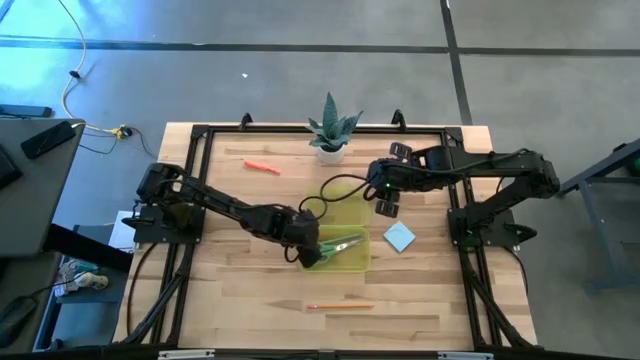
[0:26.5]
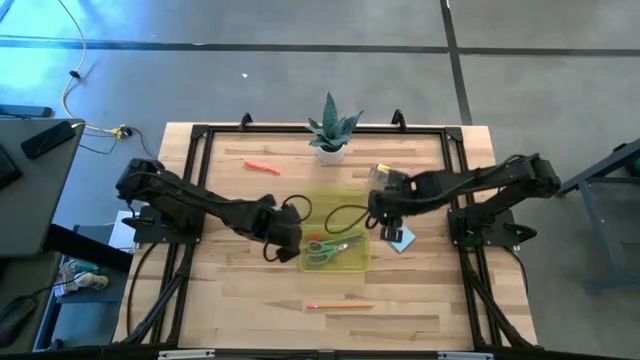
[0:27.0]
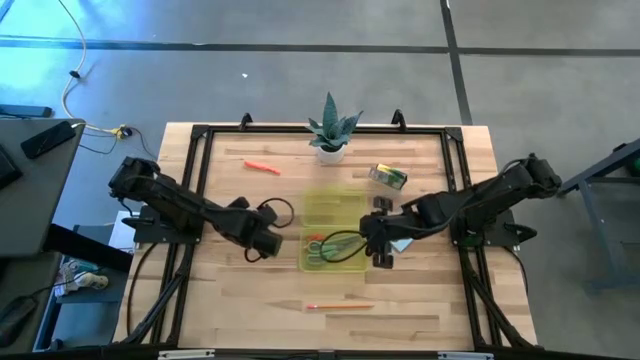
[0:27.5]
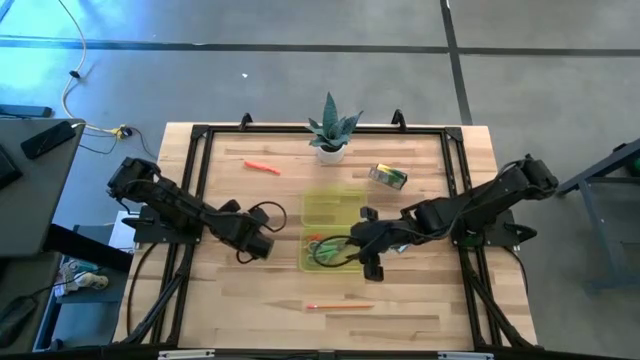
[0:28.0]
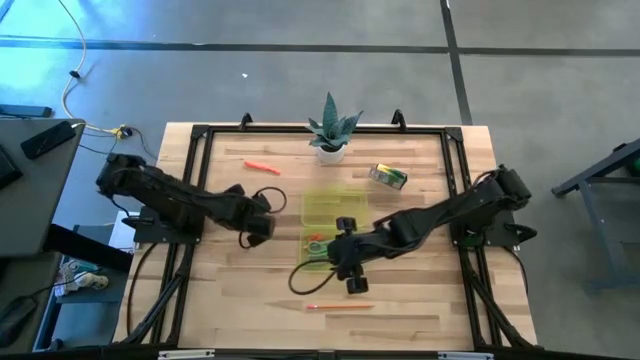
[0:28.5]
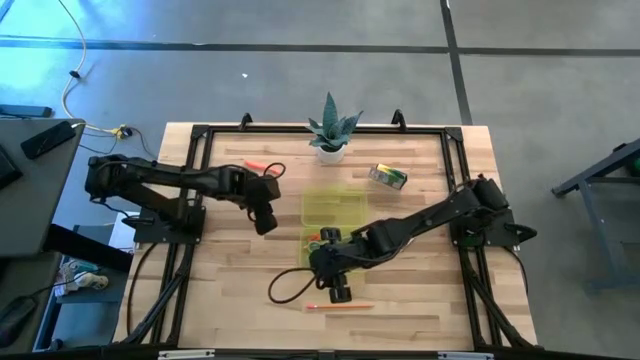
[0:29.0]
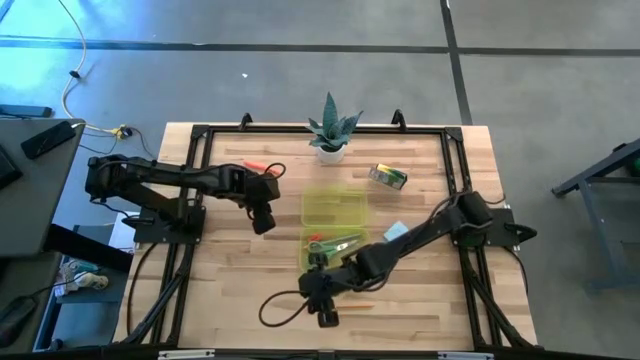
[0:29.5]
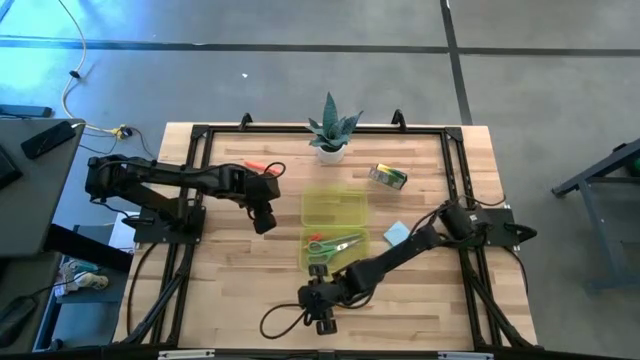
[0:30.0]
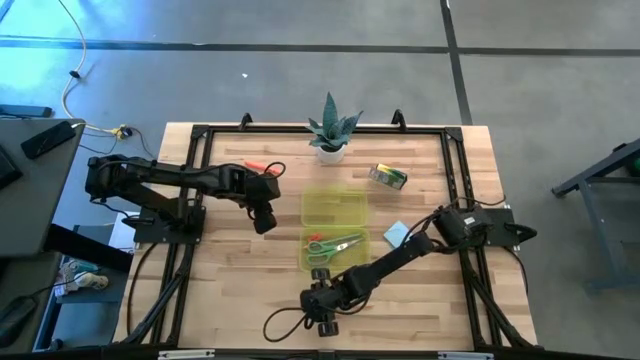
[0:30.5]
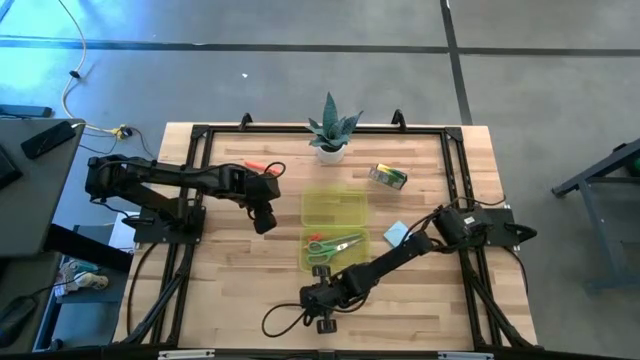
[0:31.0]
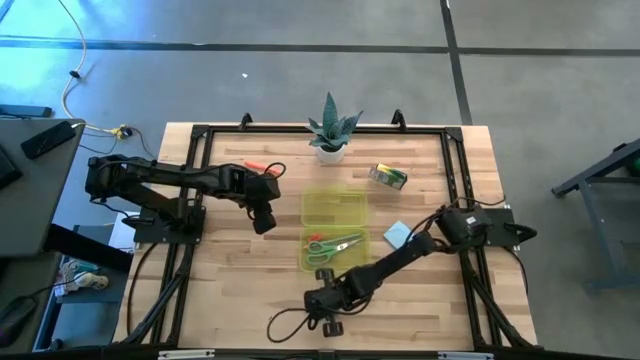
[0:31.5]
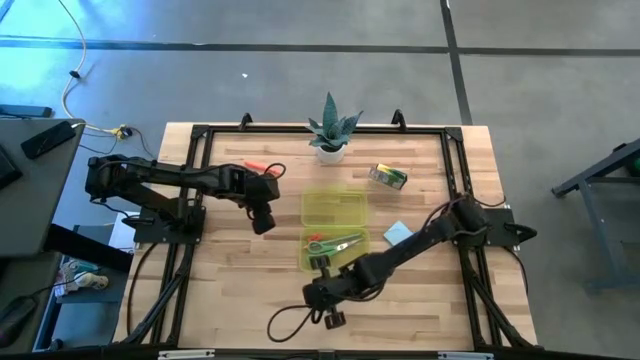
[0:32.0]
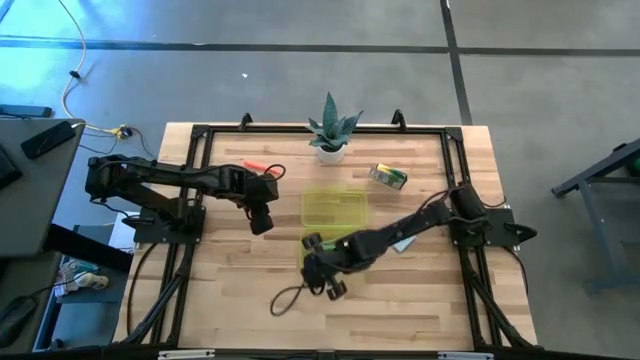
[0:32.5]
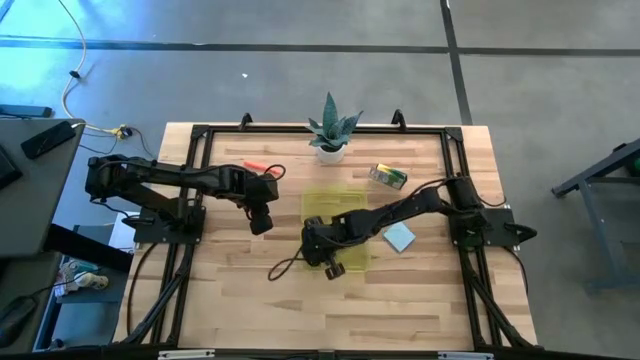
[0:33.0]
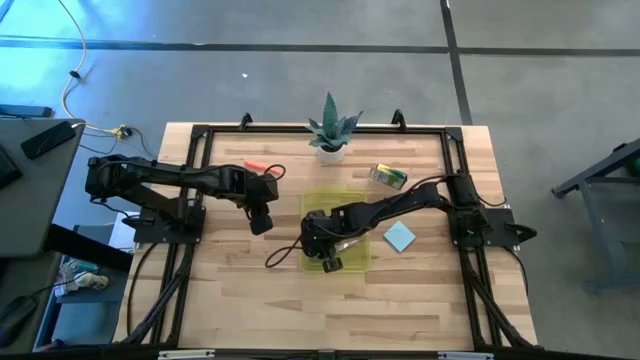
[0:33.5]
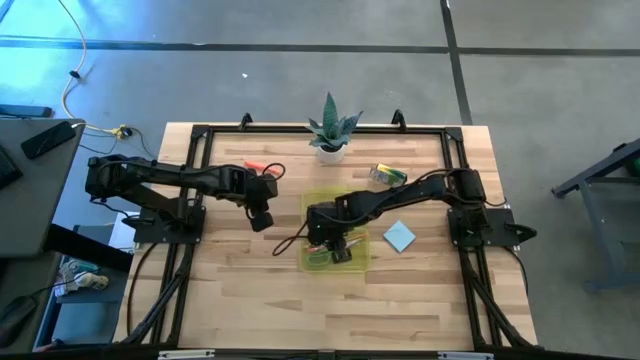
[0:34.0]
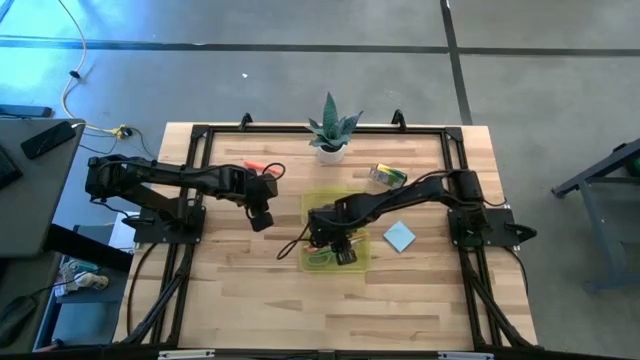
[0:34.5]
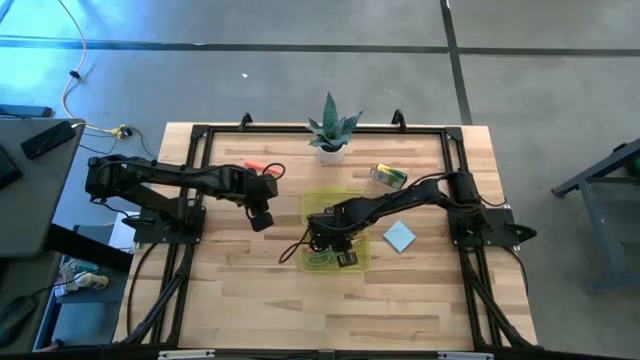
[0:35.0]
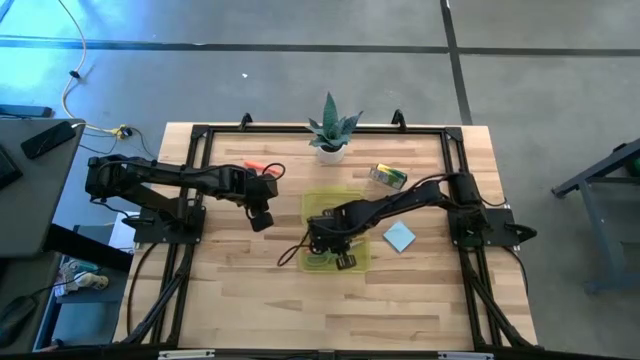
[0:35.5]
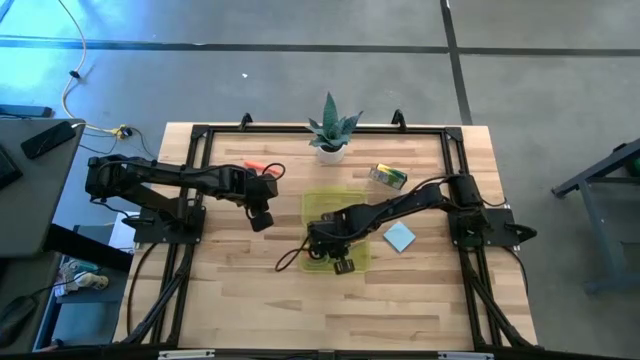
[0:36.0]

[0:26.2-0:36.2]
Task: Pack school essentials
Put the orange pencil into the yellow supply box

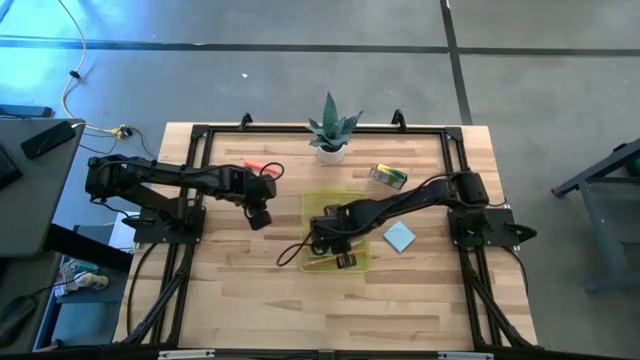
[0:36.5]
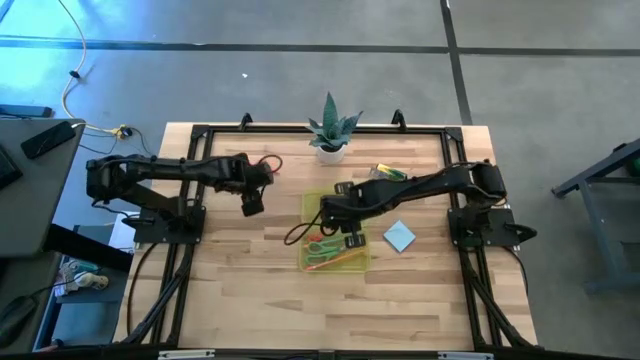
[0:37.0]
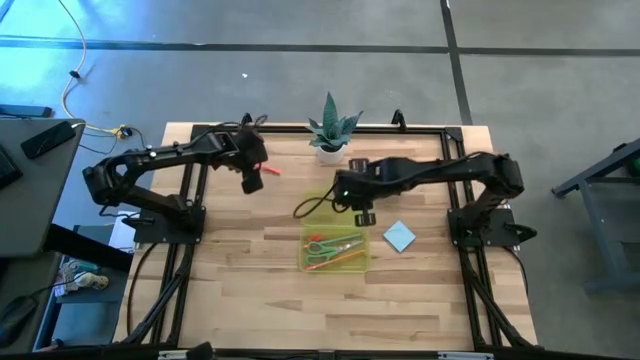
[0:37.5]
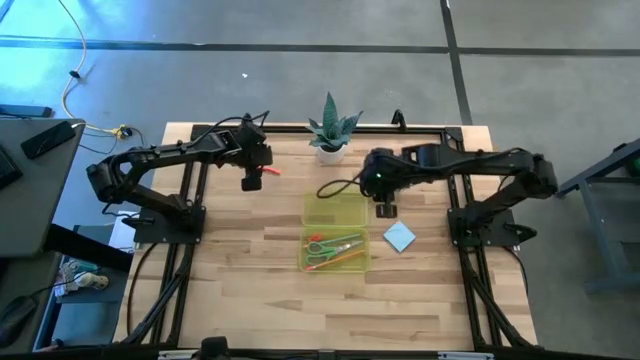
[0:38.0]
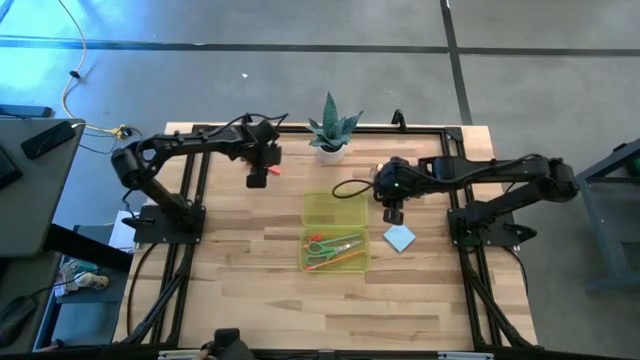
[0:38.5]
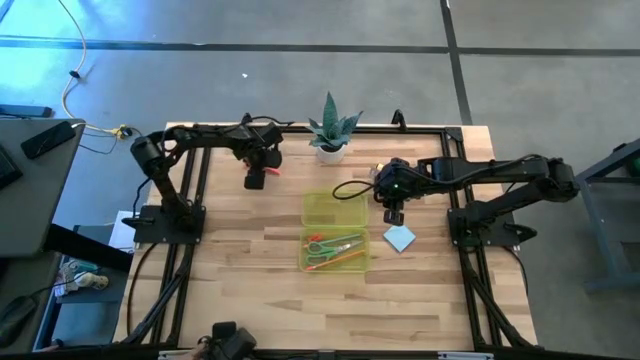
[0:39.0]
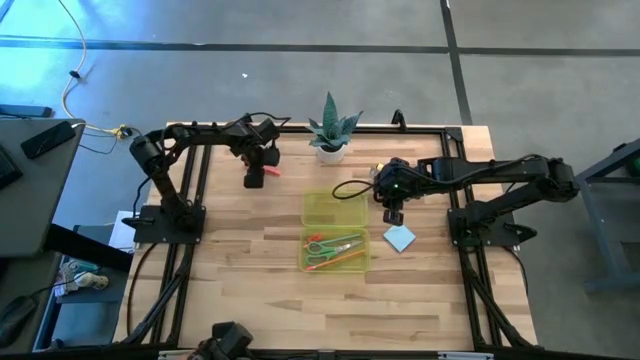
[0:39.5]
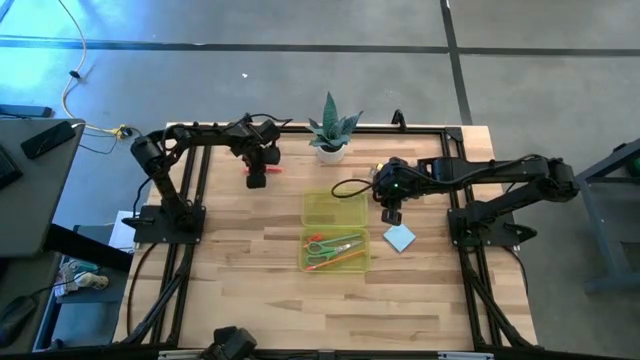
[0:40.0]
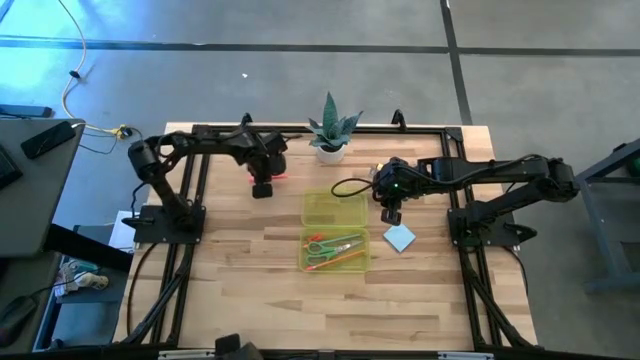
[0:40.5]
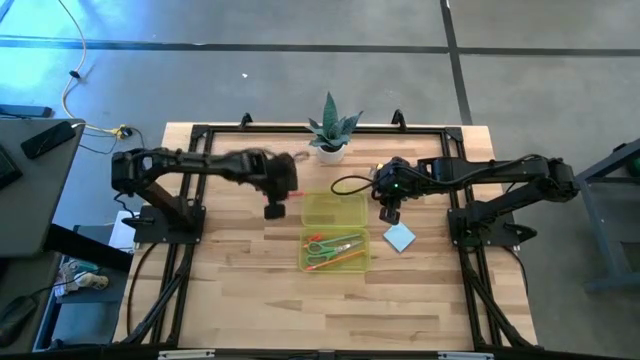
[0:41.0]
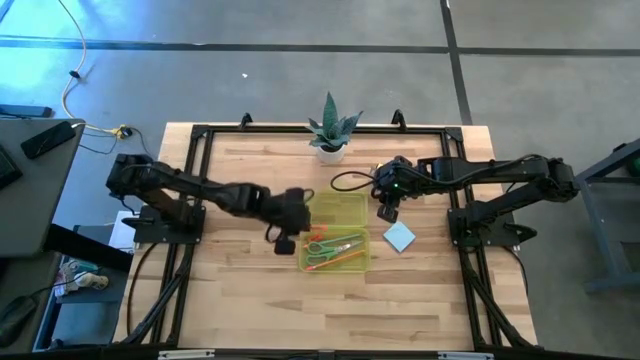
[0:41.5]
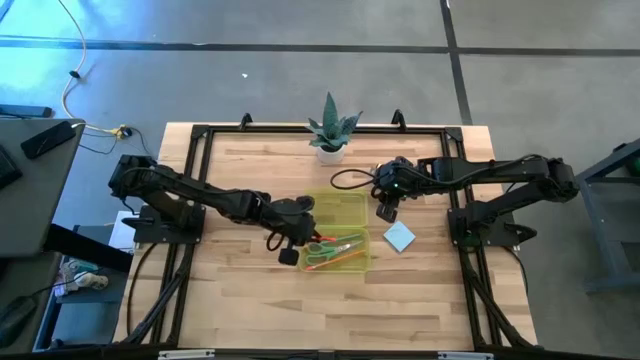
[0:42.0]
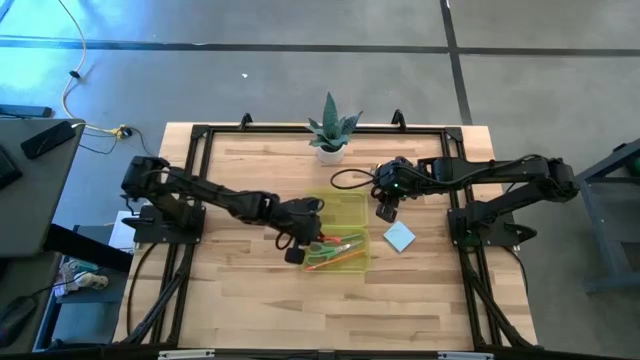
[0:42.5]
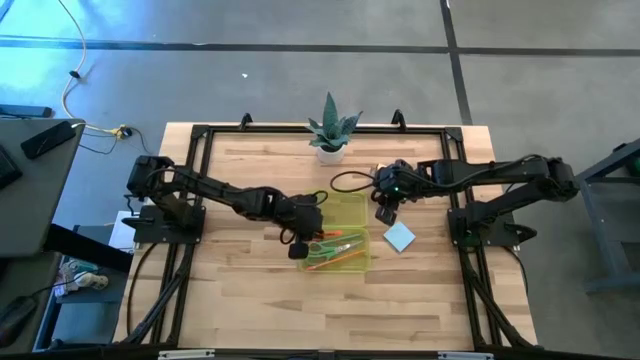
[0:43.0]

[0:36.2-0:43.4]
Put the orange pen into the yellow supply box

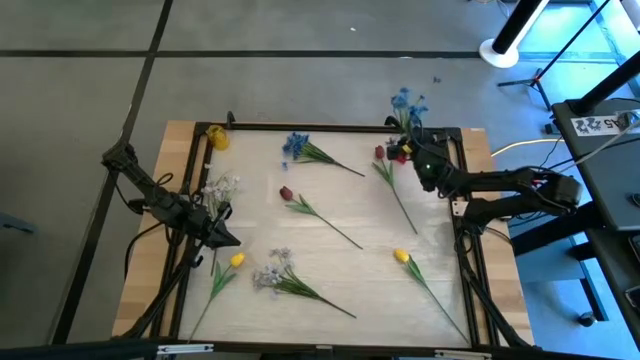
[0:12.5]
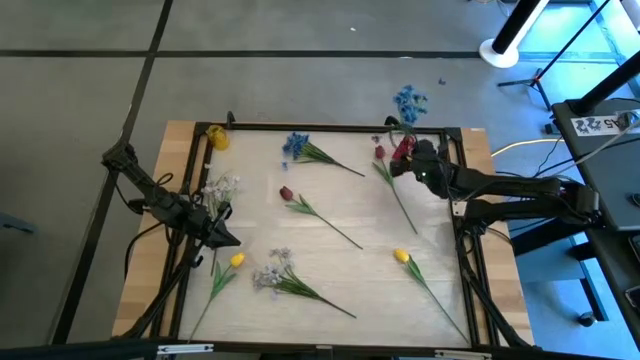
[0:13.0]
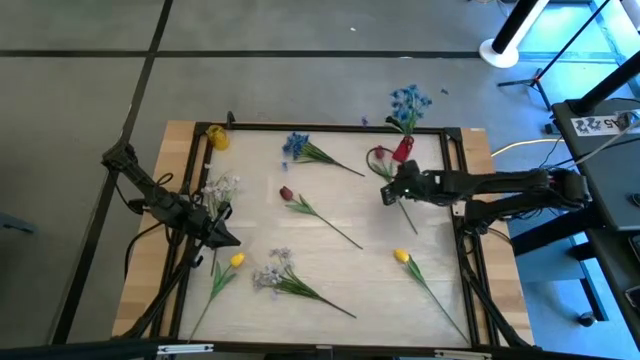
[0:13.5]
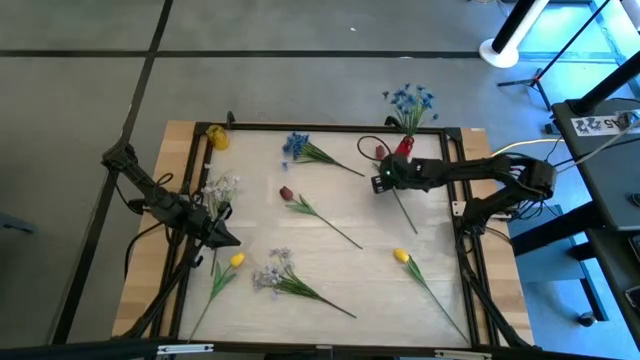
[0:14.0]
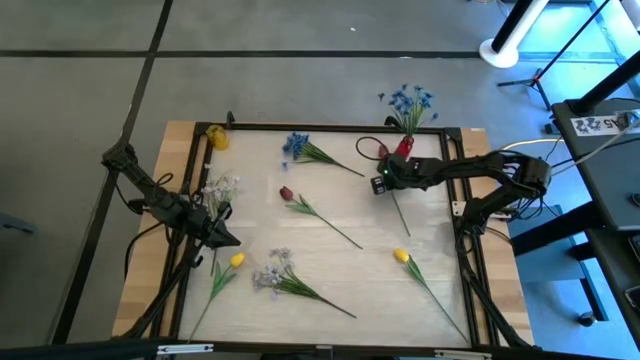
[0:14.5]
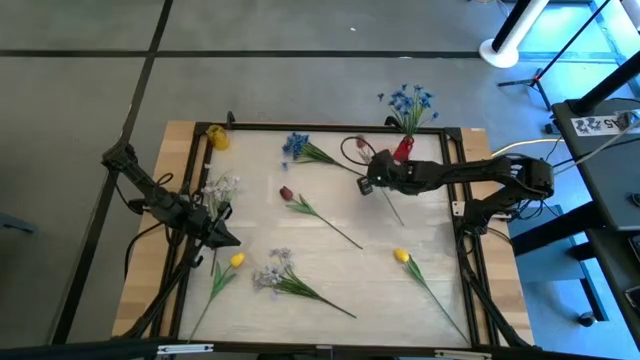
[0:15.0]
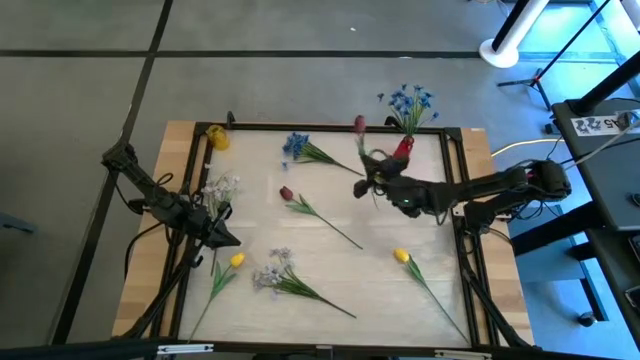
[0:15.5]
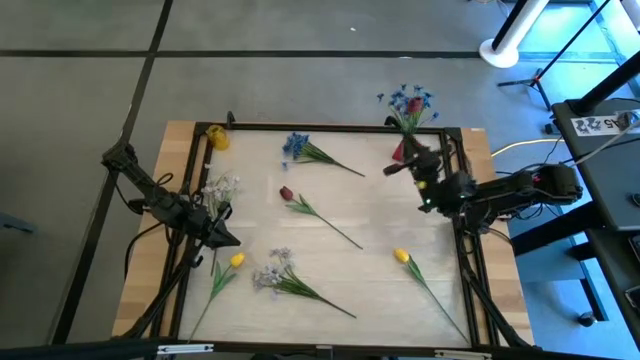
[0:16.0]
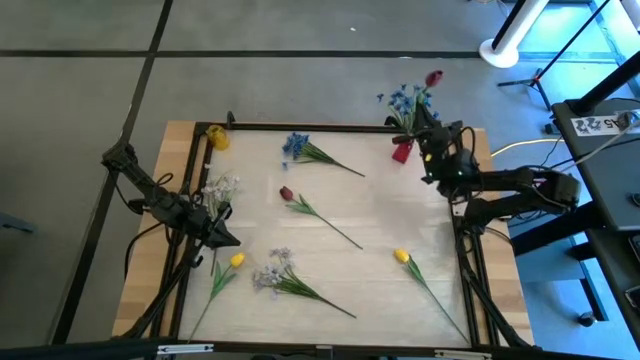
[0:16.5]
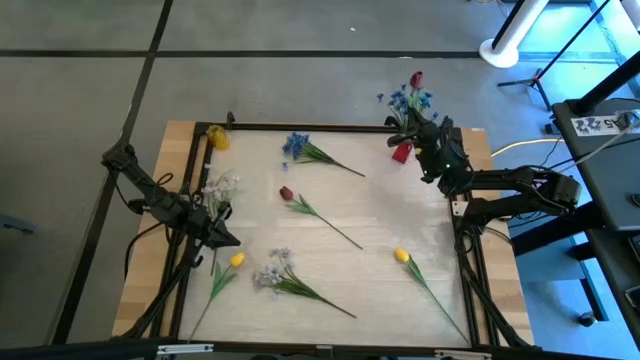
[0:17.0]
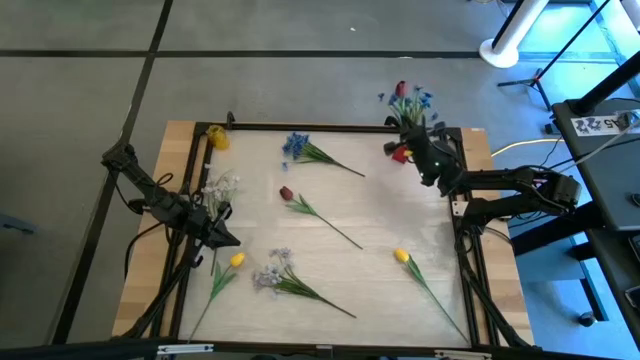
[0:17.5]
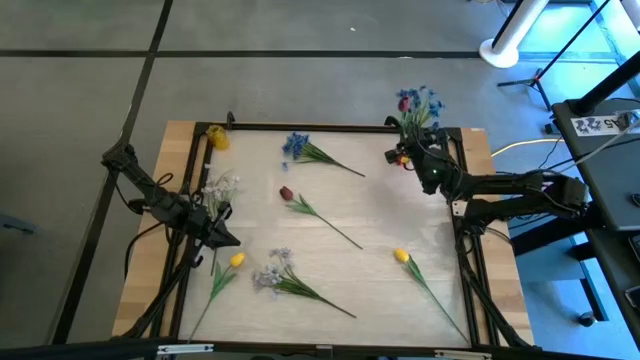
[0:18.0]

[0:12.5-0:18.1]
Task: Sort flowers into vase by color
Put the right red flower into the red vase
